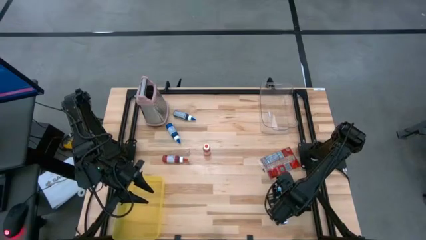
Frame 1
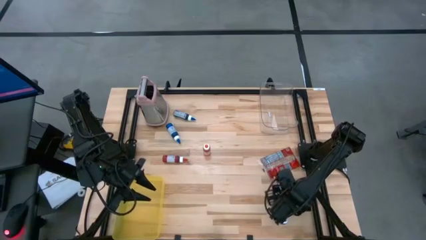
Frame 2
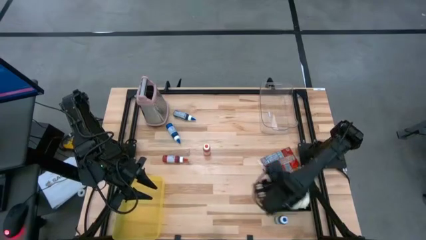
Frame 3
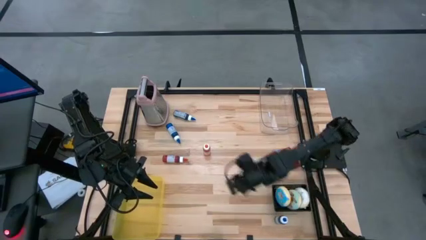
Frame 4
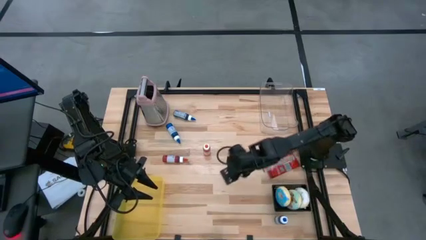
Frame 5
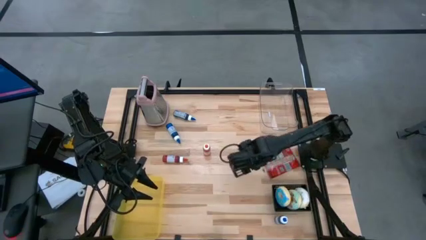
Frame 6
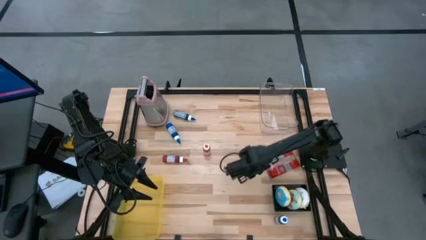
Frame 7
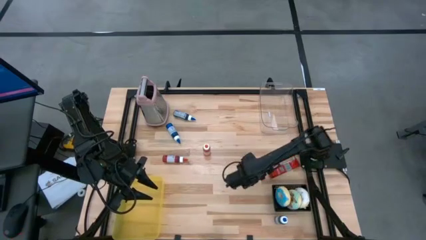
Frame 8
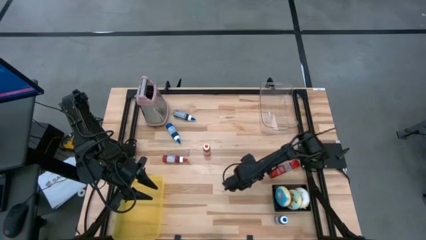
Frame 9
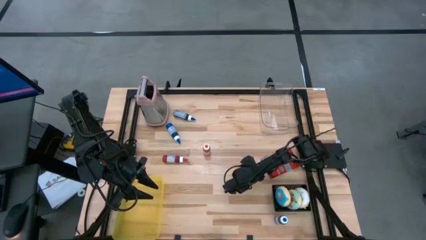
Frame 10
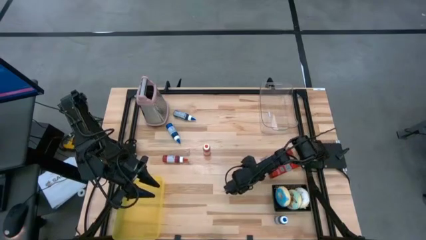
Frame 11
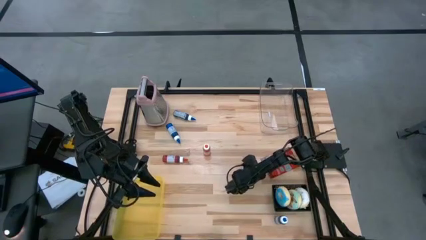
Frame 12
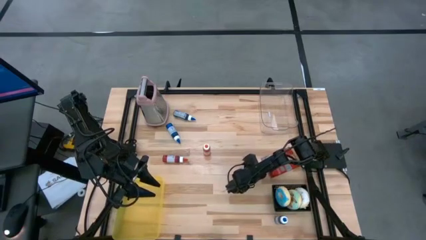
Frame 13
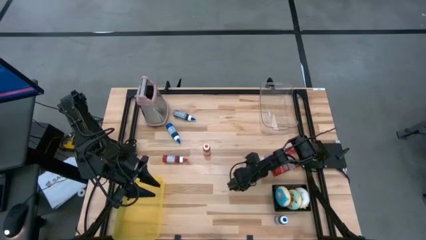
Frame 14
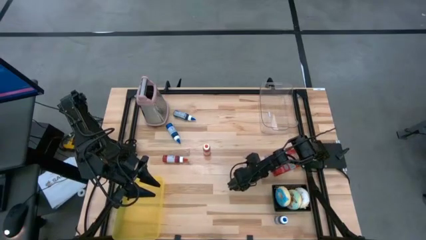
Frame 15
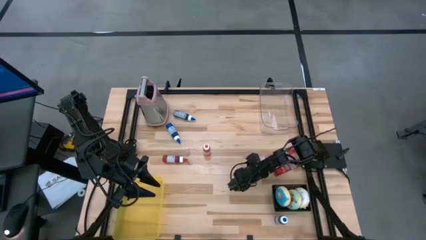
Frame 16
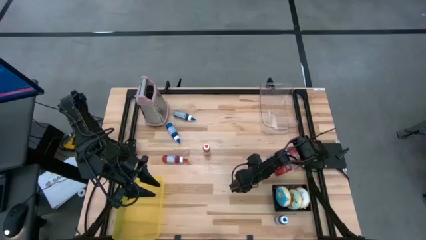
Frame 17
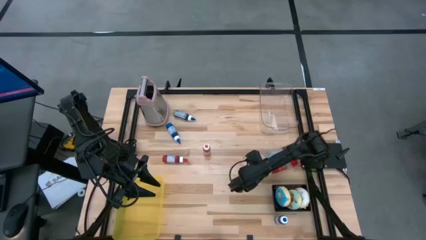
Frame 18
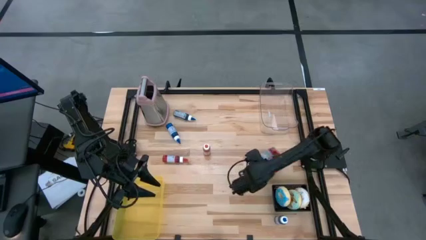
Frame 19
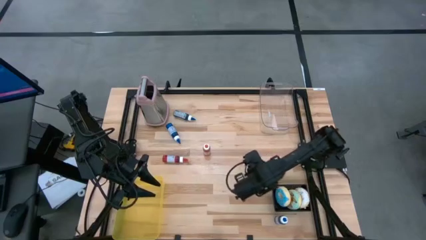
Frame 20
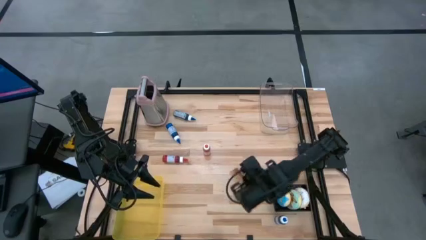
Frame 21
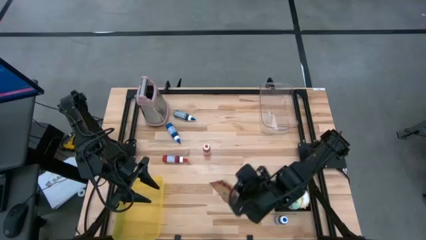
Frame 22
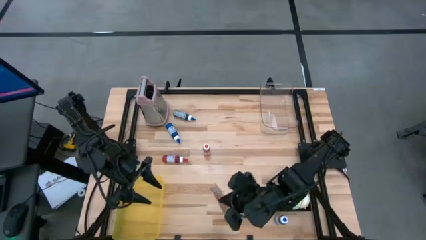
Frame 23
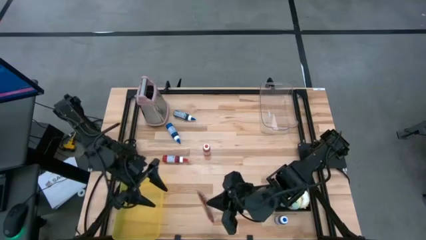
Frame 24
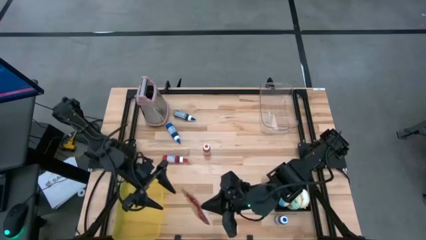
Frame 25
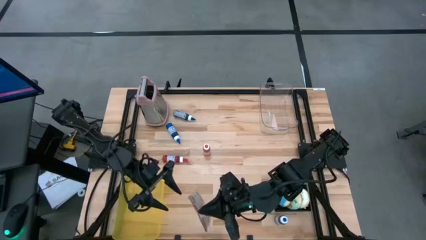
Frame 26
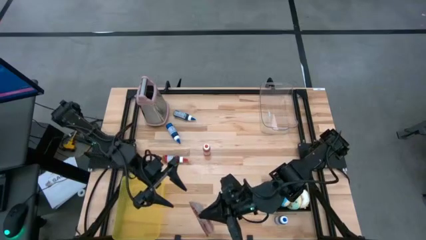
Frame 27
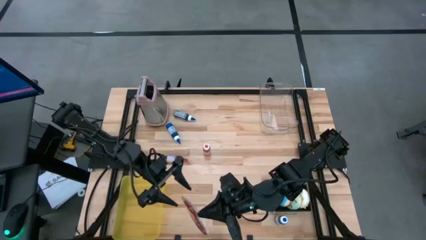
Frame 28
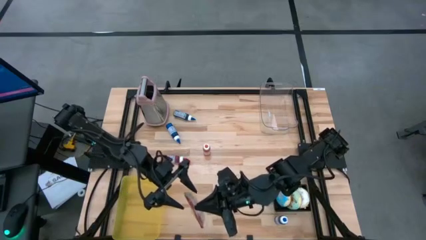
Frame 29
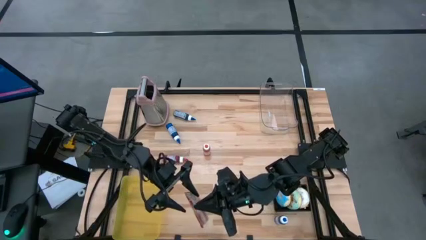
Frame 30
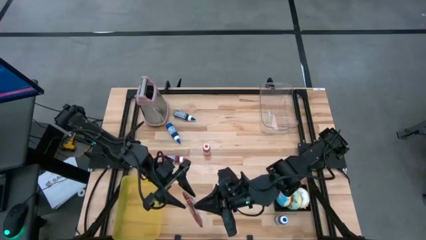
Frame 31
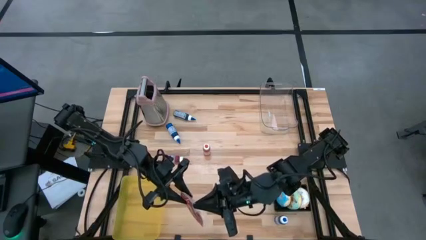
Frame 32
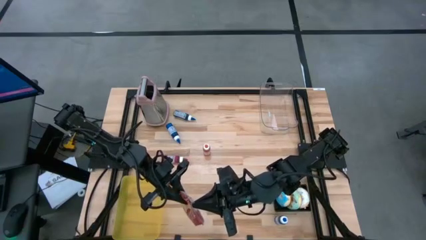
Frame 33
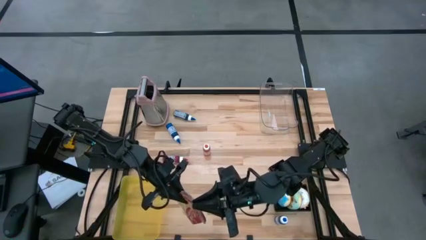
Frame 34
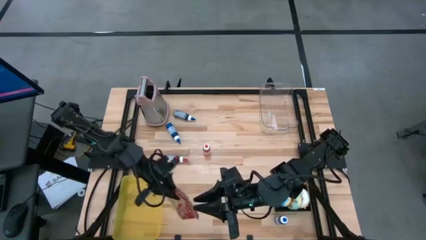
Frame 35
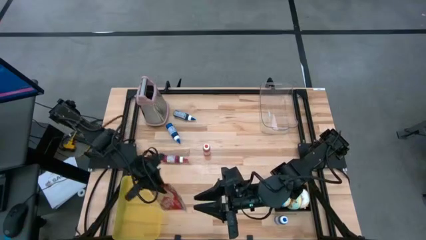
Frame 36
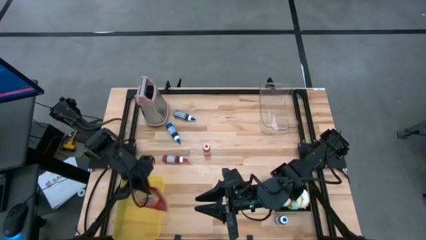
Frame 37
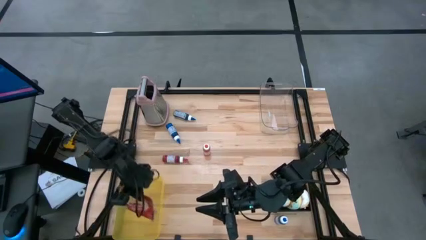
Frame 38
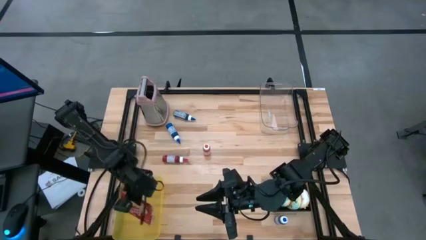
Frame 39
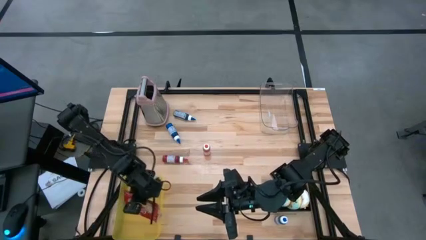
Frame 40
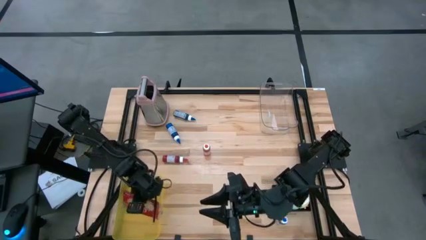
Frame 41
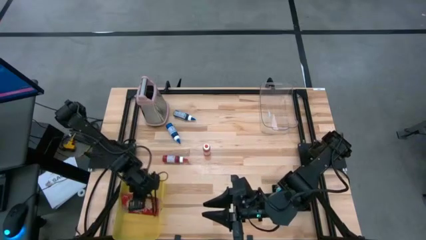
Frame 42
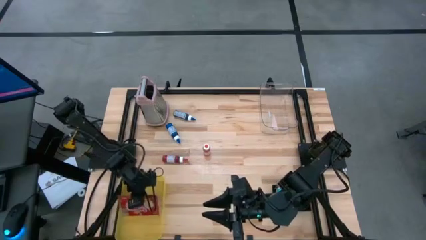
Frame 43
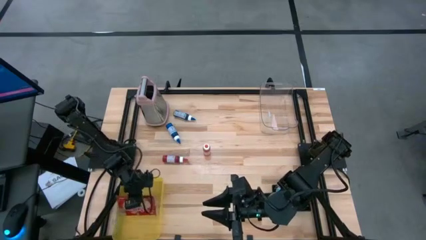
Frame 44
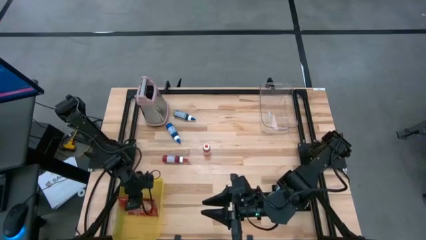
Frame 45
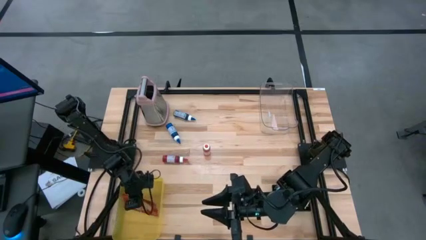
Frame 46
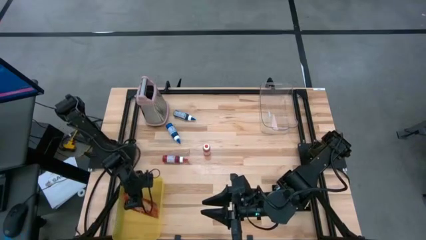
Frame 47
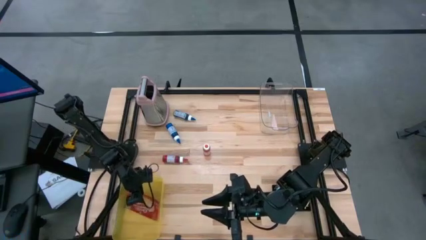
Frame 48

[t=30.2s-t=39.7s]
Put the red popcorn bag into the yellow bin
